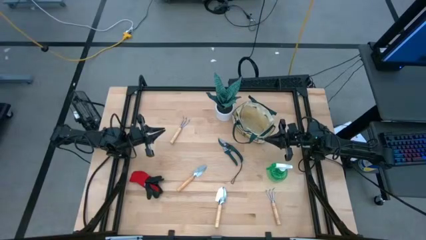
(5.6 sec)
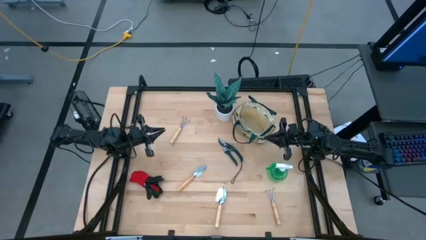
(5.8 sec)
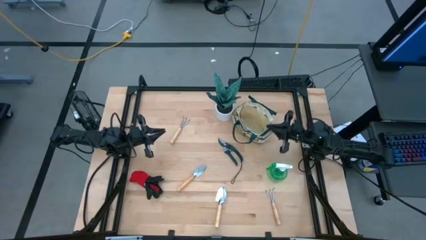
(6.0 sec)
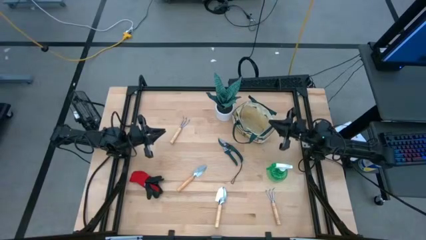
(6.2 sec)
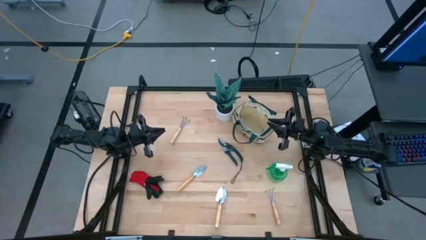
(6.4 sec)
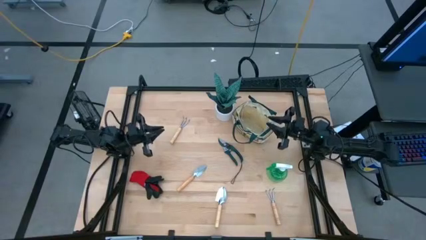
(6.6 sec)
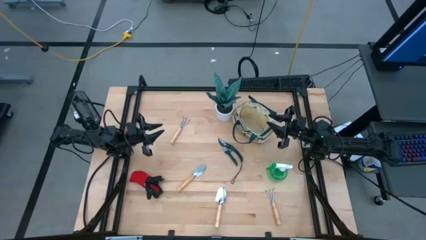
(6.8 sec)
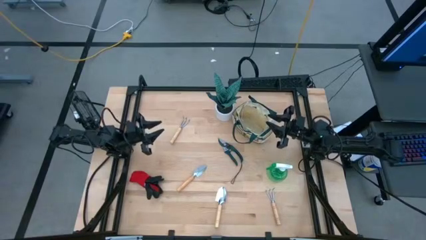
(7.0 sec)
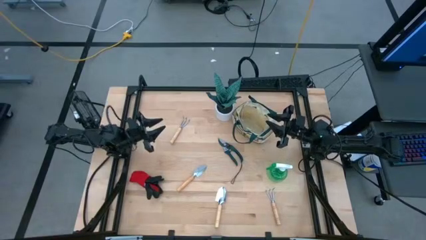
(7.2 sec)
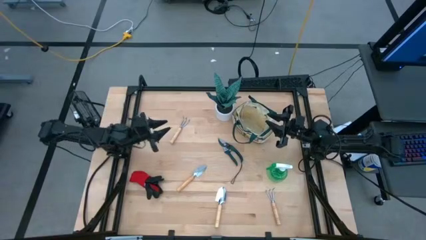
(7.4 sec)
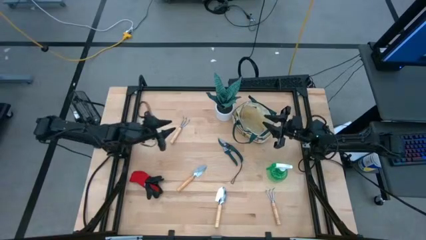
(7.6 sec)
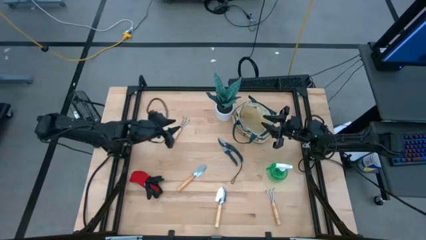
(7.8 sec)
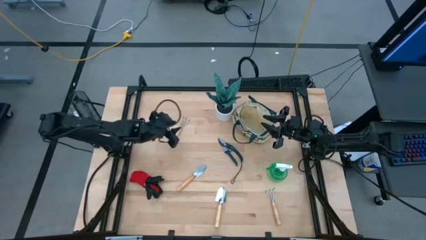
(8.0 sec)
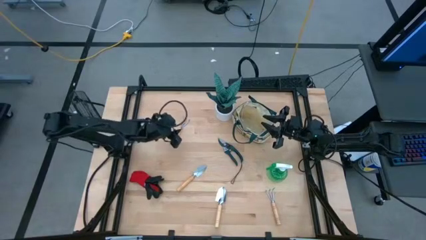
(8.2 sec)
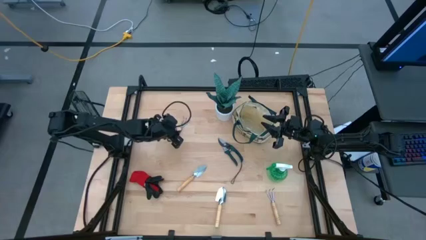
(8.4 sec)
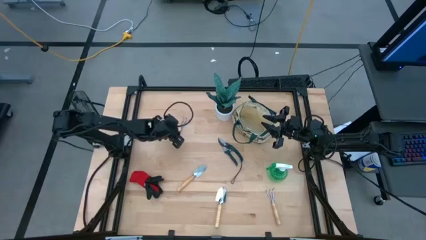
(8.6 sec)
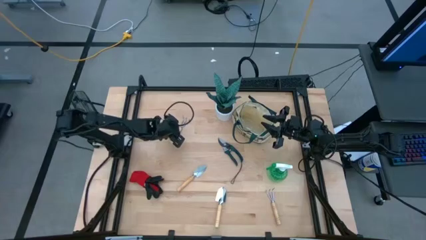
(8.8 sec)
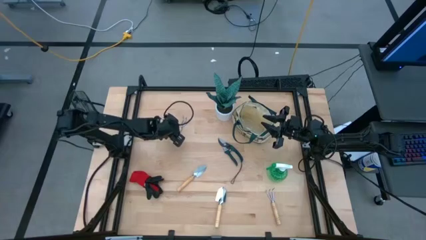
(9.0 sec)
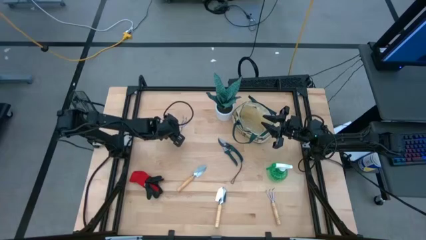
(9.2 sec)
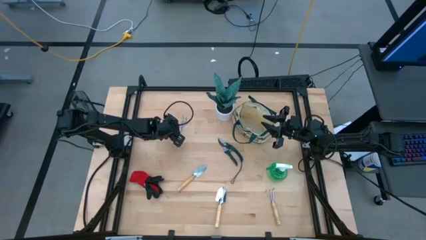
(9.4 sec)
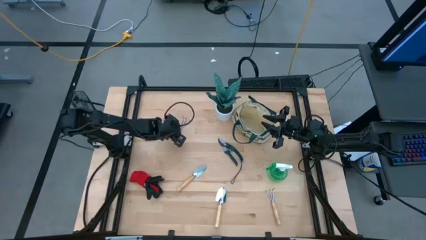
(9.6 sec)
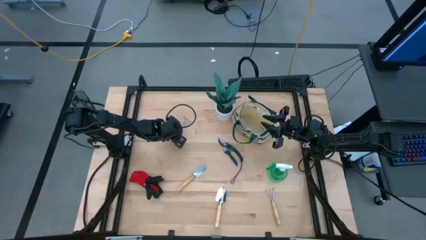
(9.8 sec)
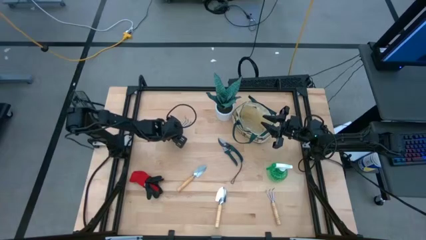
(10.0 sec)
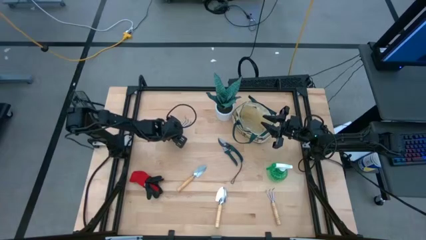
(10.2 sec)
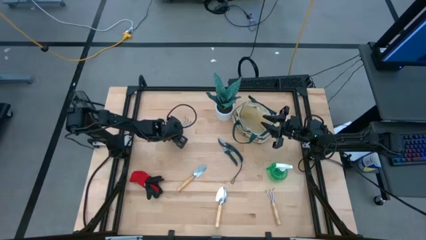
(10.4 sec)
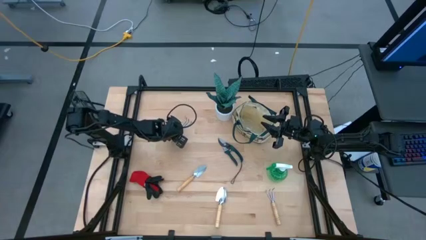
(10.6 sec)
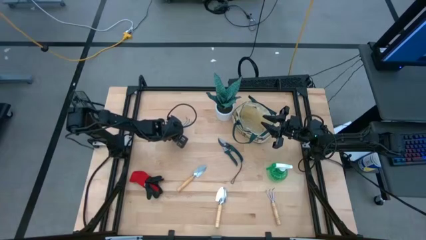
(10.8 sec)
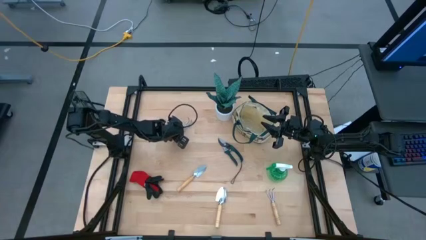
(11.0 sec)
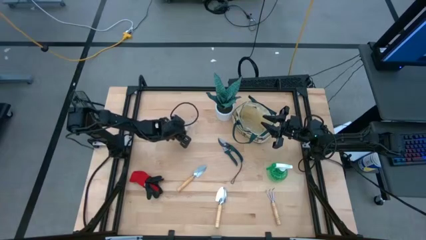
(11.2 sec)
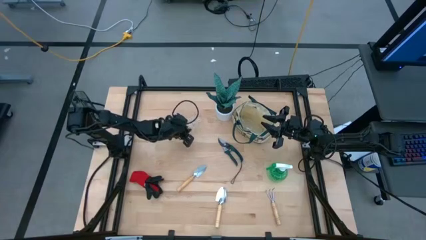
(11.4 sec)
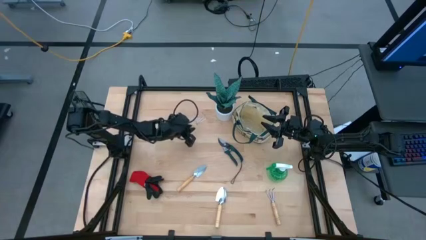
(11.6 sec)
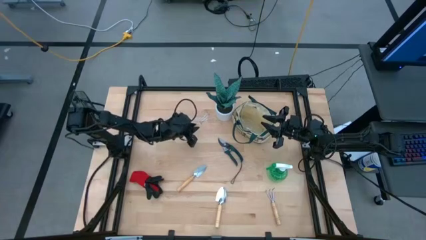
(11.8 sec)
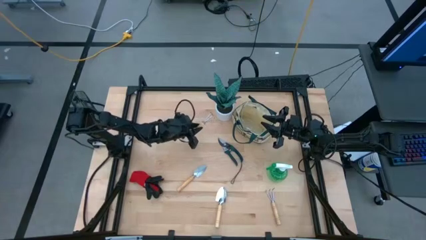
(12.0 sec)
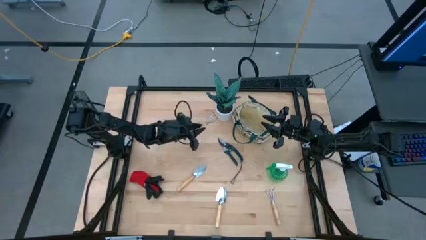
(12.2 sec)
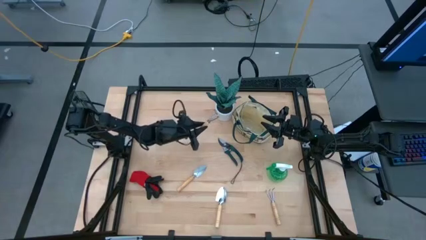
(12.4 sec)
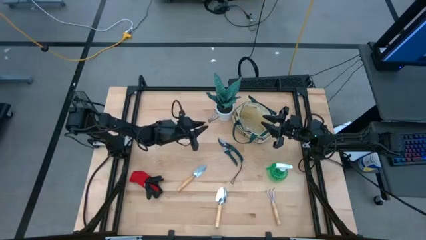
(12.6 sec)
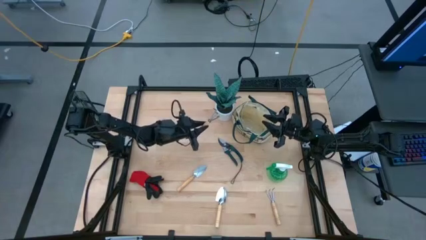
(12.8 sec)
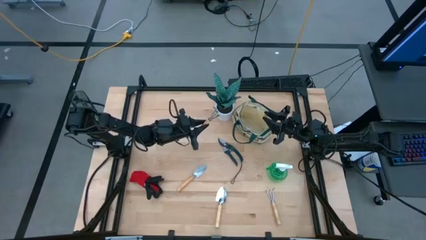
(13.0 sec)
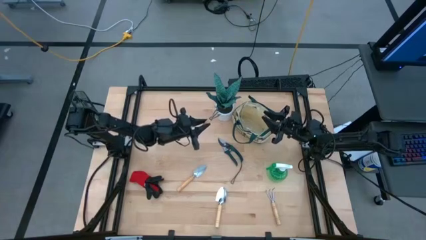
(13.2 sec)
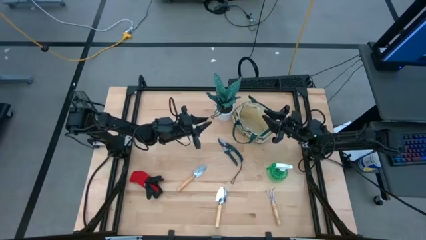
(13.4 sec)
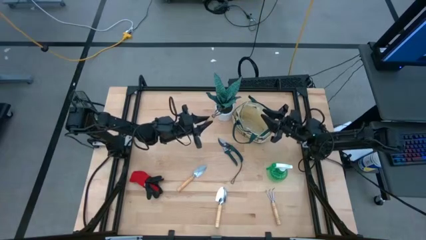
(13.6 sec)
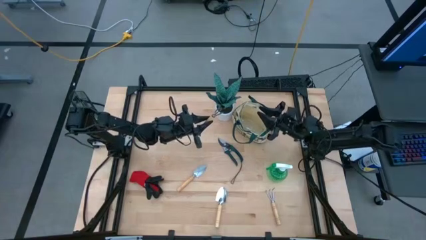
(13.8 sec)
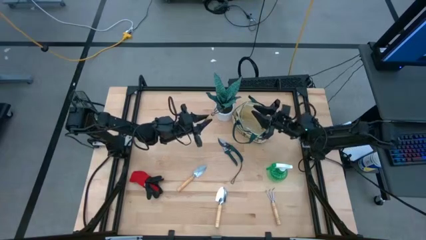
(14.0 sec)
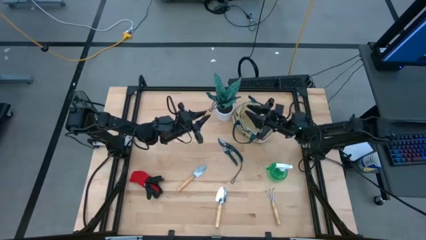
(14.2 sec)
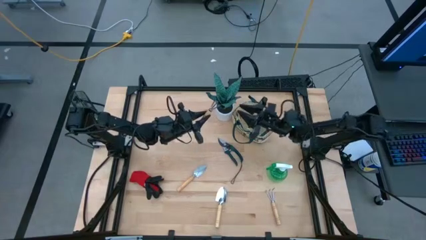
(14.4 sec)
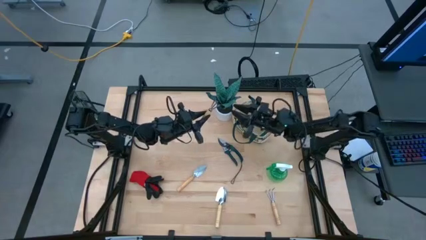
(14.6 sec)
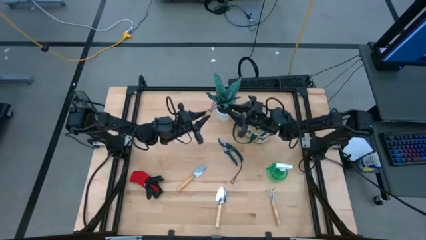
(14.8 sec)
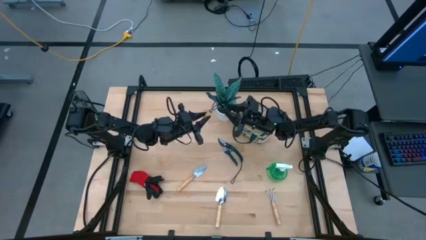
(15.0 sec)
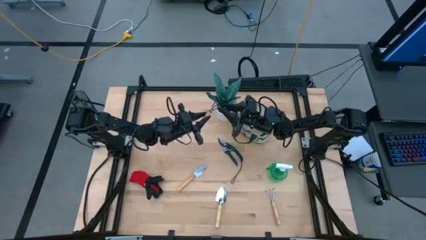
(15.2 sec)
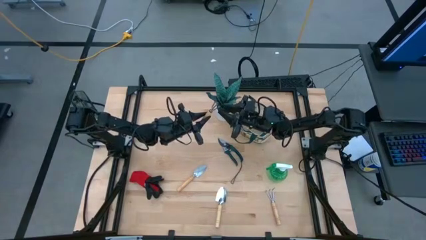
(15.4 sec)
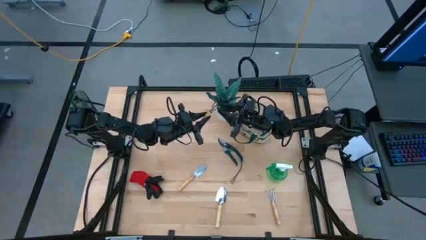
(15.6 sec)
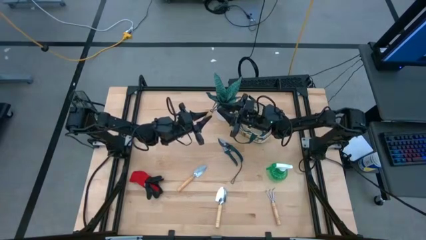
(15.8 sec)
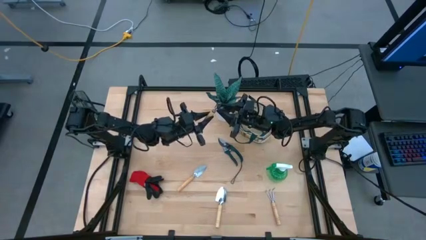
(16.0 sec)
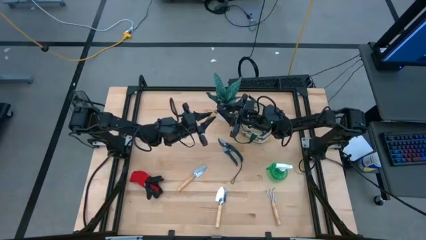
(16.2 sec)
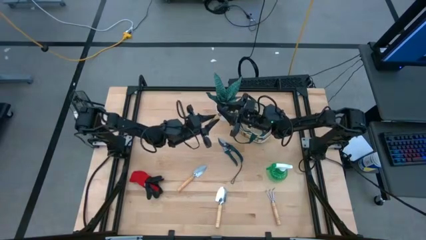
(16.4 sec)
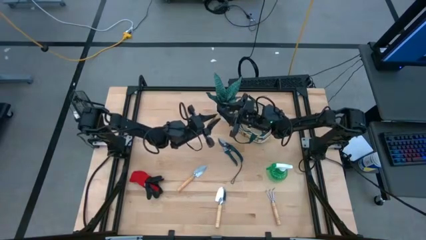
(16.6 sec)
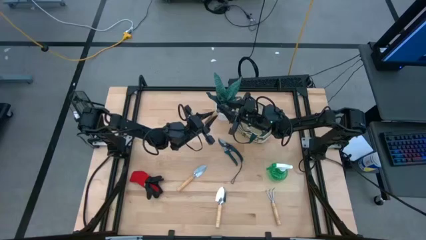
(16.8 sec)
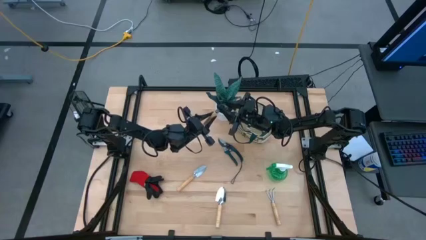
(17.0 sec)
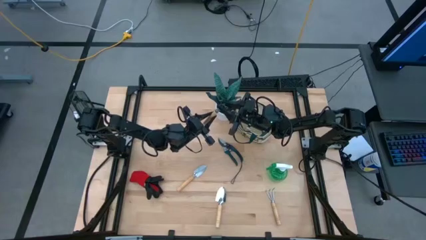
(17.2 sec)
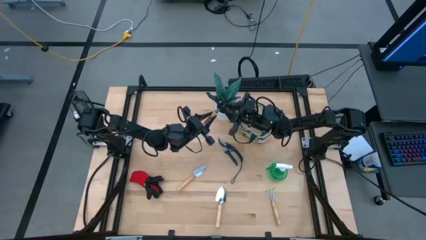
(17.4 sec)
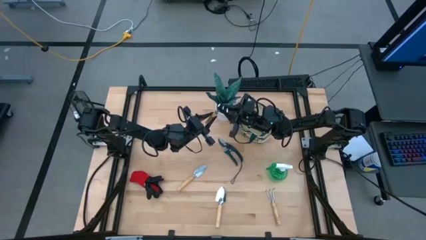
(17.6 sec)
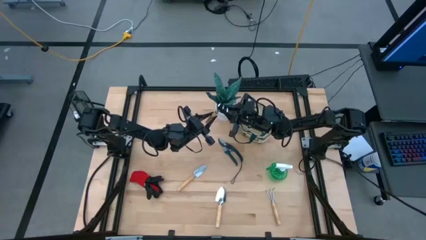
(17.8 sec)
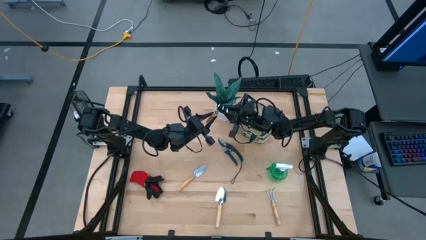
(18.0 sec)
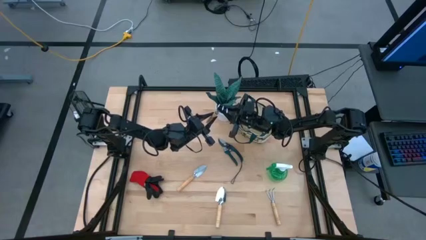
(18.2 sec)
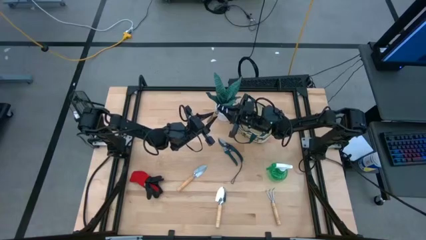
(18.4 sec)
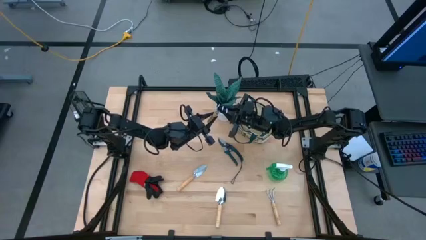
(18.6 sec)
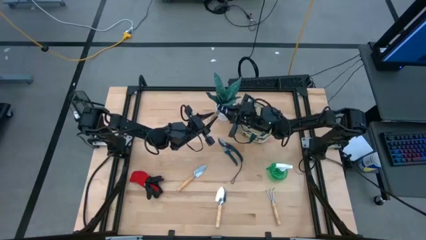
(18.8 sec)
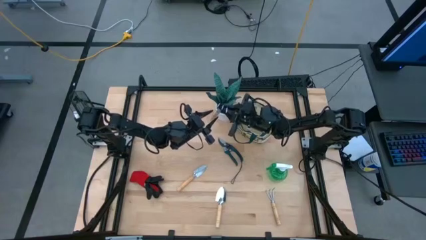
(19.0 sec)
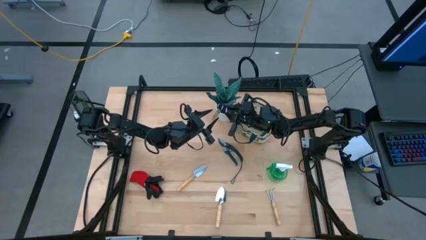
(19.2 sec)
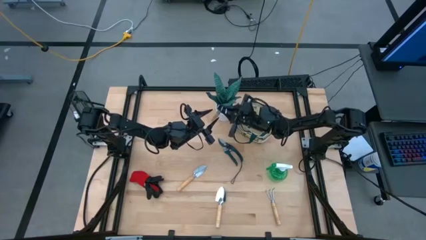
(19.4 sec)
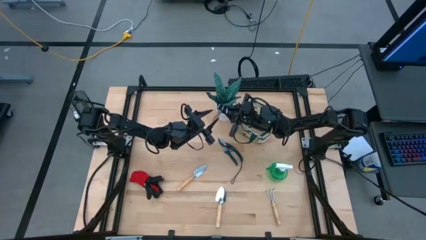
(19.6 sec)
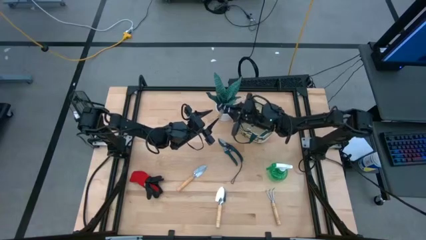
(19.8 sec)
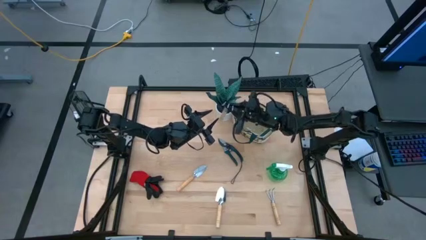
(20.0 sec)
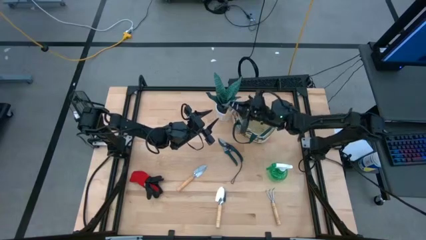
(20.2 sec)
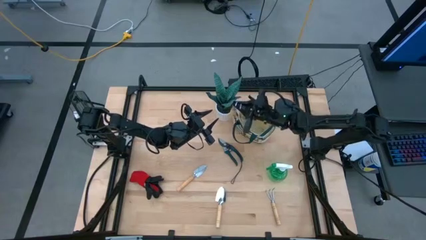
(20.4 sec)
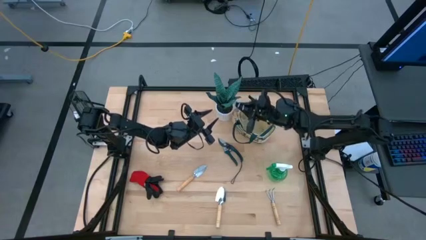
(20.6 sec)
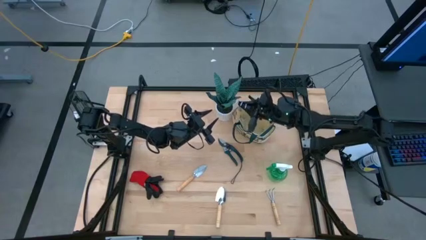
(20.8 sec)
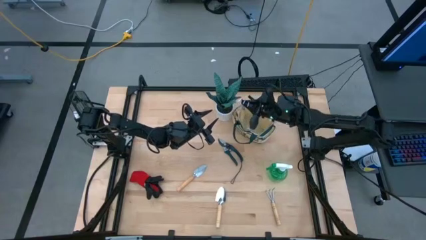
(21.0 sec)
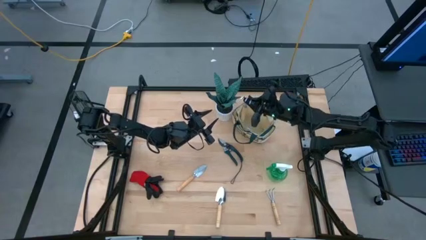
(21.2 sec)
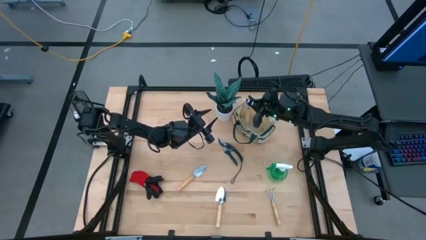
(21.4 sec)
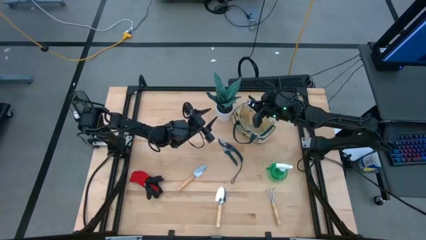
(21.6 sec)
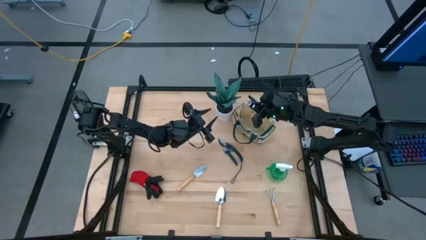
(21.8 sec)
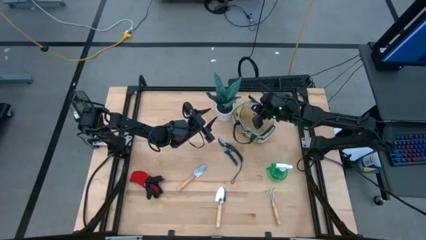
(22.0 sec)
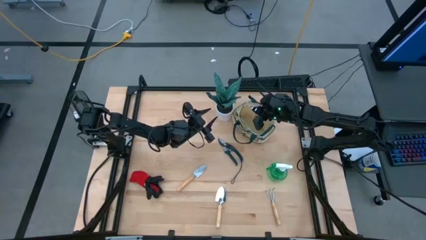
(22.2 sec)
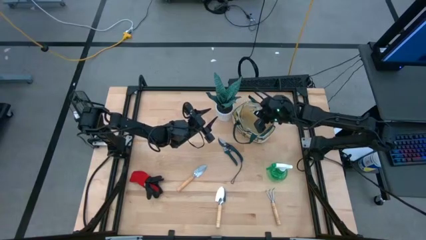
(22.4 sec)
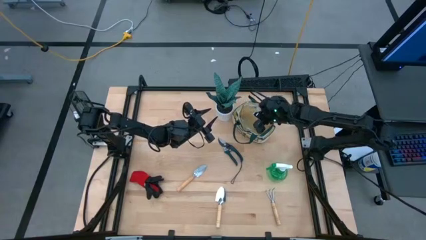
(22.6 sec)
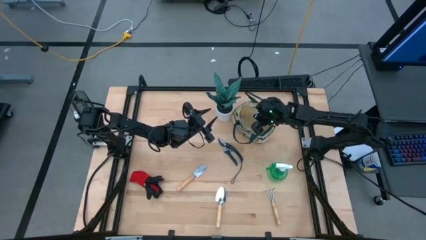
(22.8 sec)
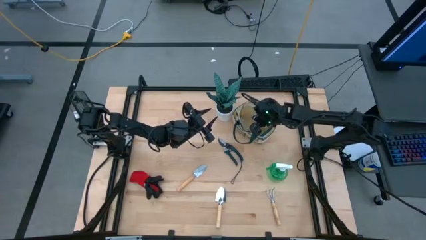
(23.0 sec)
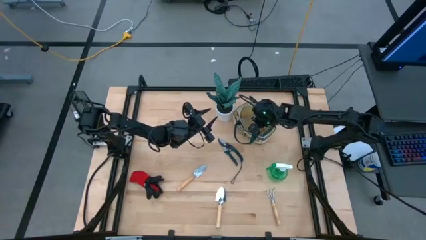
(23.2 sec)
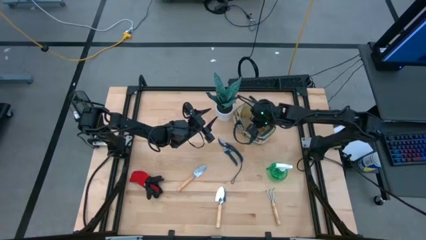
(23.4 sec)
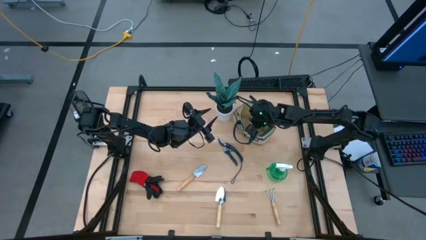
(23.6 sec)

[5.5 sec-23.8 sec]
Task: Pick & Place Garden tools in Gardening bag
Put the top brown hand rake into the gardening bag
